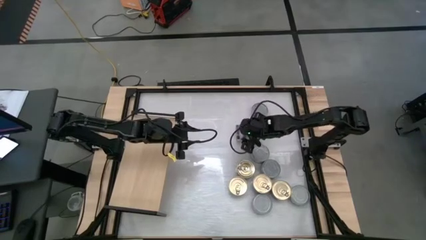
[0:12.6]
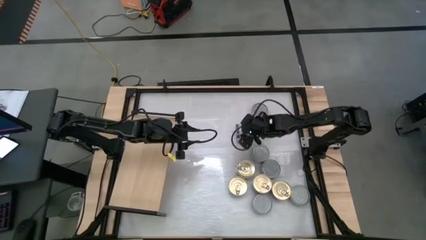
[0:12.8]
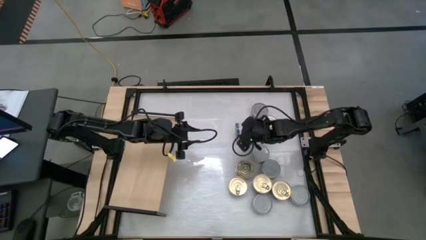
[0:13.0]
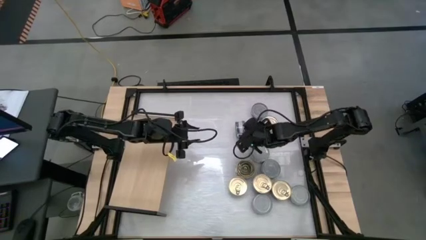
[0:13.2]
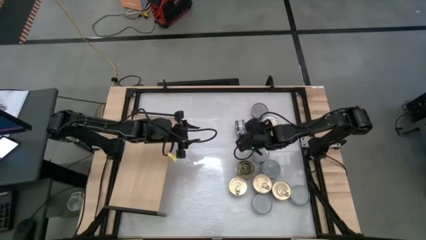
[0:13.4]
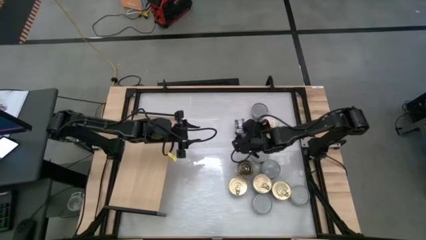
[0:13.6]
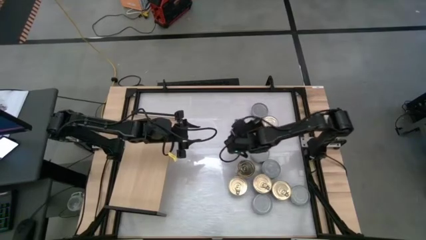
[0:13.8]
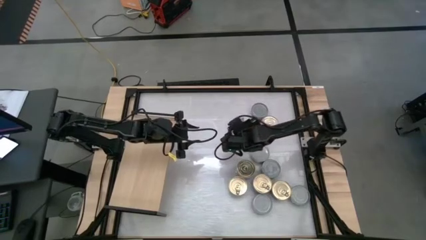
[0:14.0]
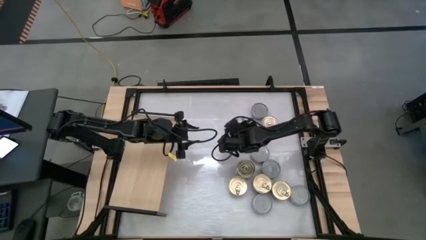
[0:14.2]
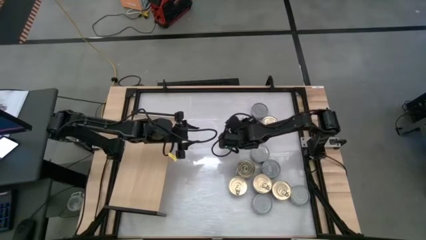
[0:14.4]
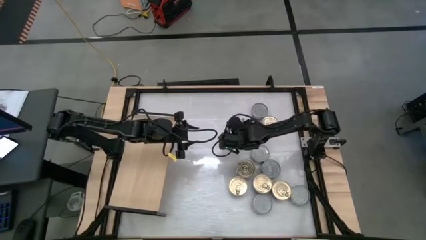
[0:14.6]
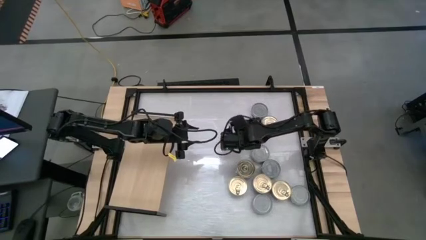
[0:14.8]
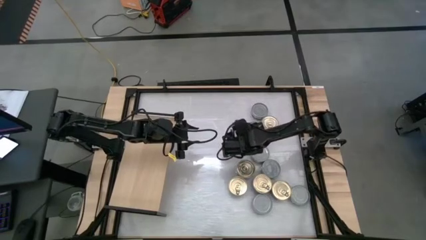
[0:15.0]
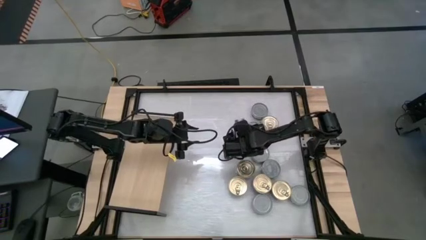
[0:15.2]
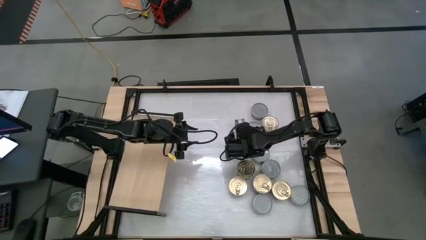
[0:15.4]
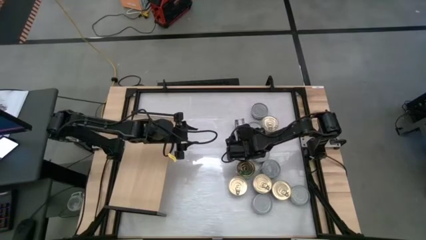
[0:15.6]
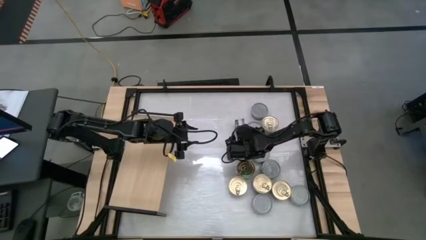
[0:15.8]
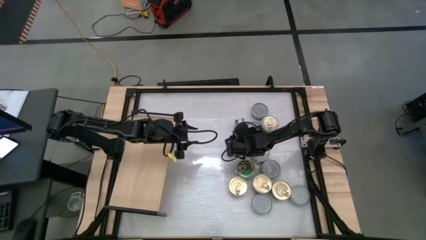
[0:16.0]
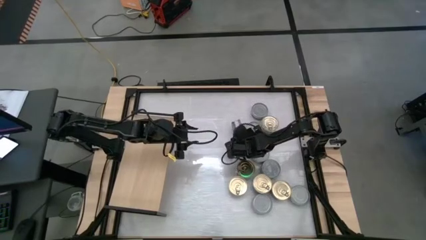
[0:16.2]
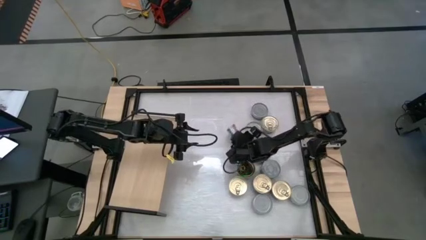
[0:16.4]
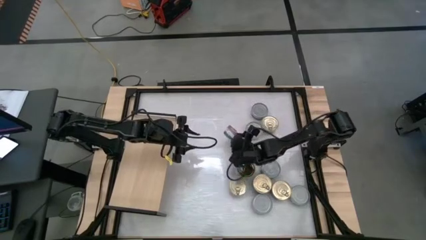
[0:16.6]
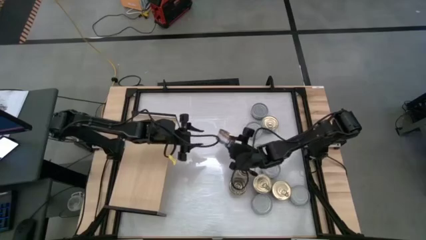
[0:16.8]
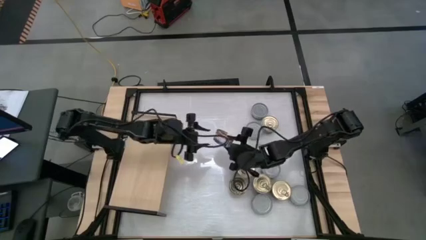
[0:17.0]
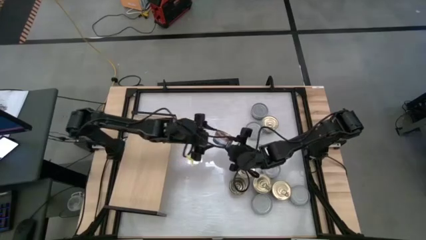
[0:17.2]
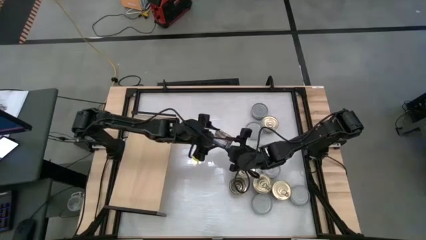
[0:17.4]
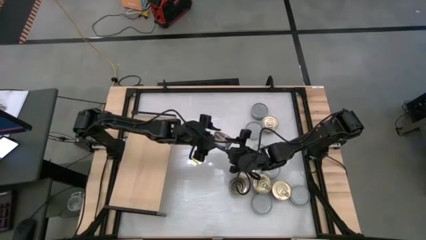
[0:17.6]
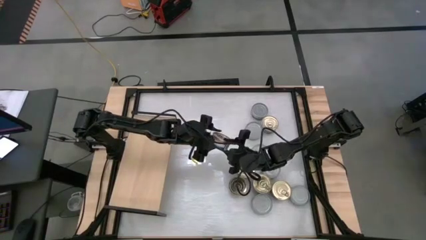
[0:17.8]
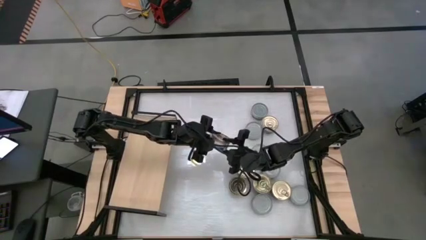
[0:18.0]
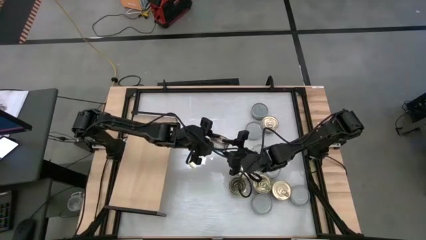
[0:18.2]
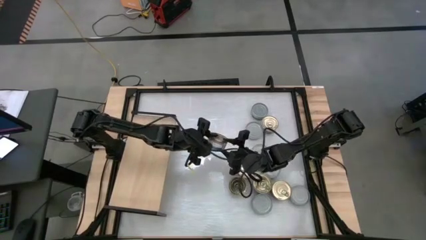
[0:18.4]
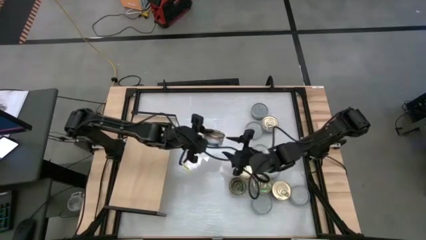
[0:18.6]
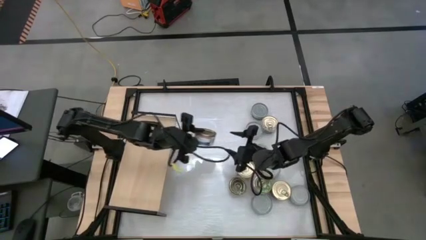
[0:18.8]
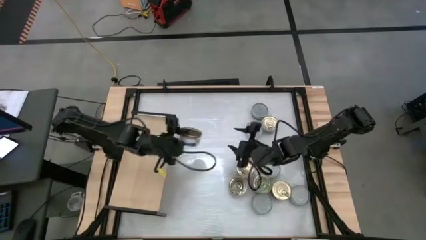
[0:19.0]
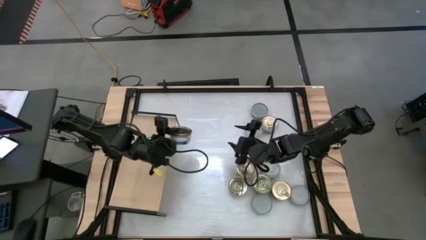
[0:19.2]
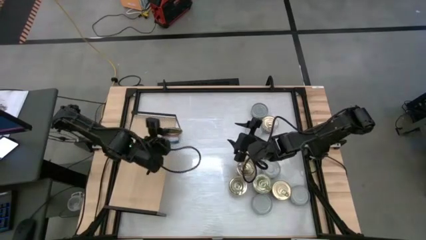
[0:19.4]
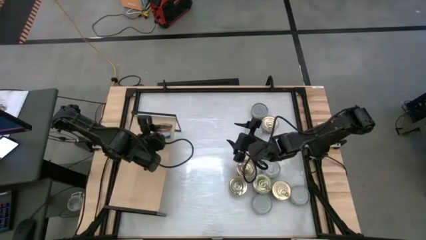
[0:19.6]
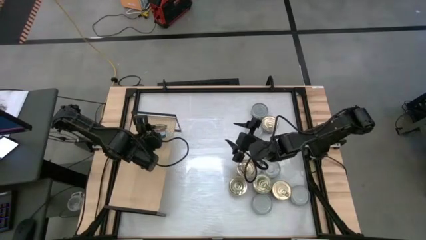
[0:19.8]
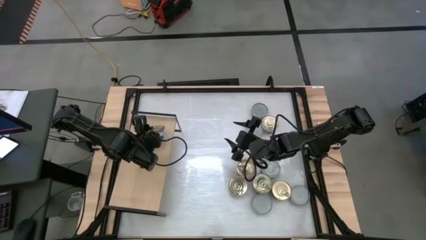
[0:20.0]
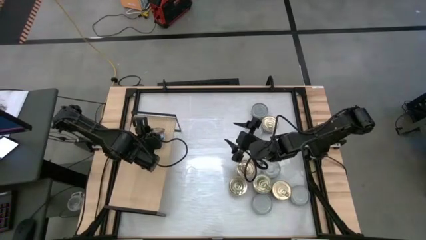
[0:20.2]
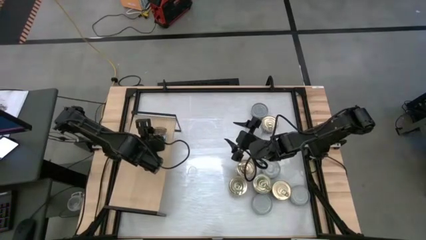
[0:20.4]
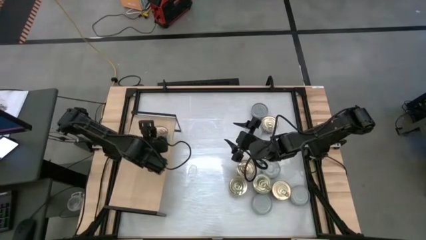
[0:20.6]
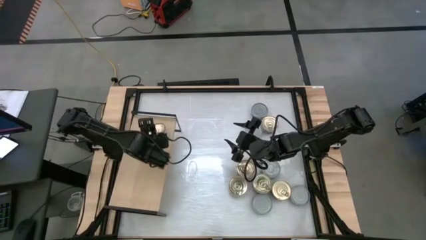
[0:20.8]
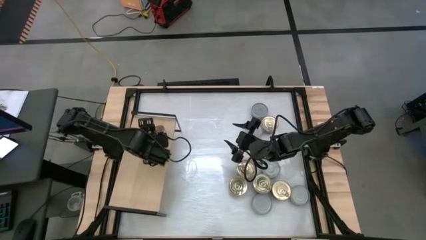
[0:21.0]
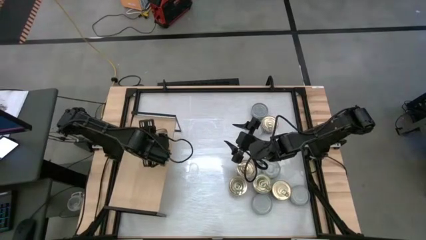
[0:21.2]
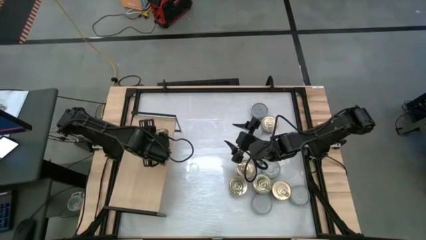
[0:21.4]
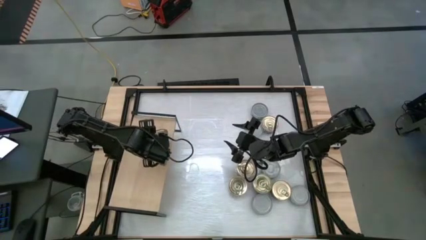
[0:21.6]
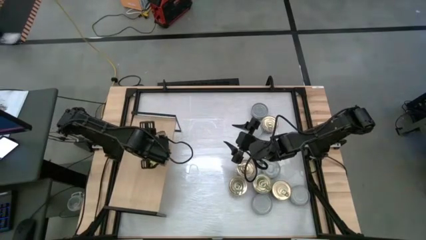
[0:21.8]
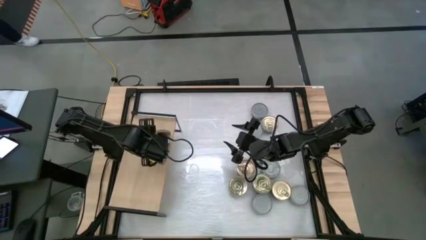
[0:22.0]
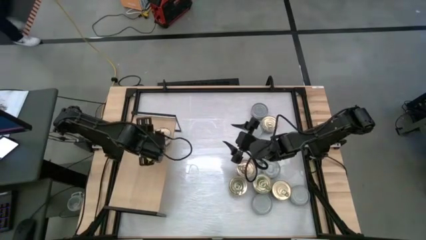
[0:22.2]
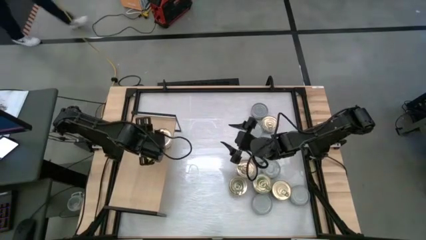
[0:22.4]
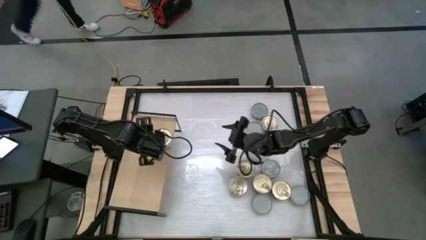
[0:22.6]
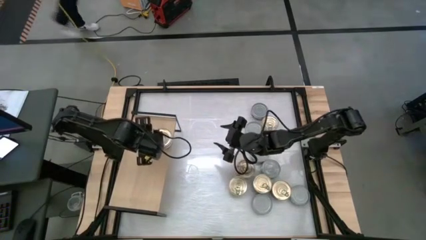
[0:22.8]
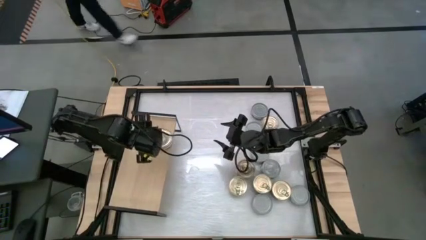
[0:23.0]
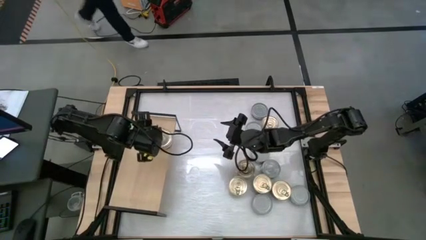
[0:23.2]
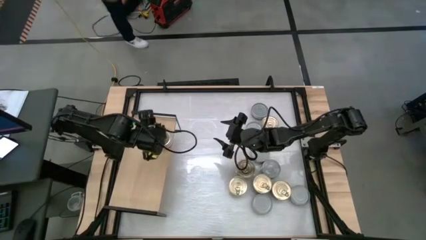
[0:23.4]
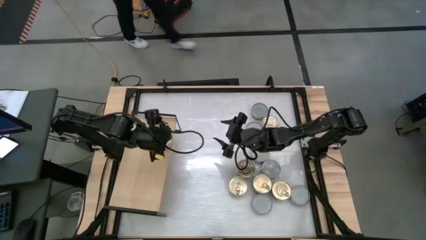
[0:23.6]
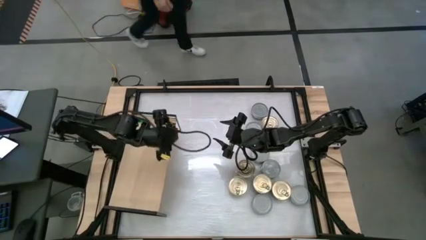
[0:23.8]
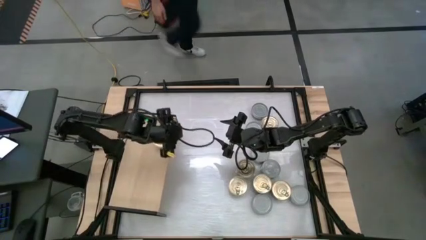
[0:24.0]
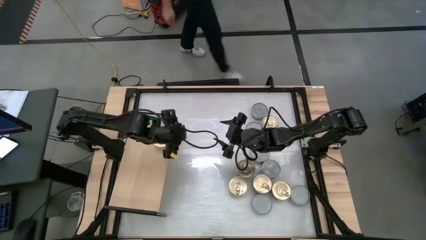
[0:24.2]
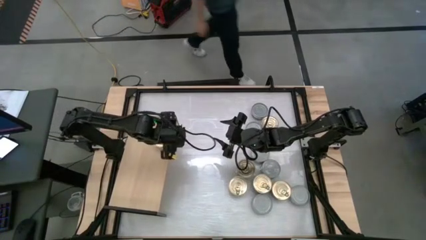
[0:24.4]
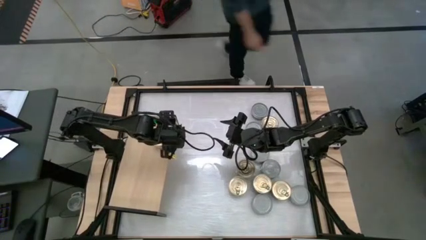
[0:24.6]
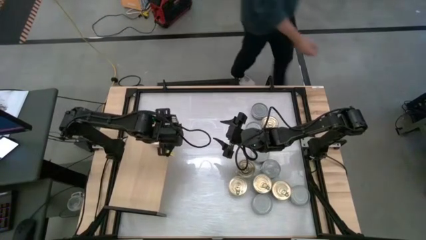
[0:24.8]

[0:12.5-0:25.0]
Task: Stack canned seafood by type on shelf
Put the blue tuna can on the shelf

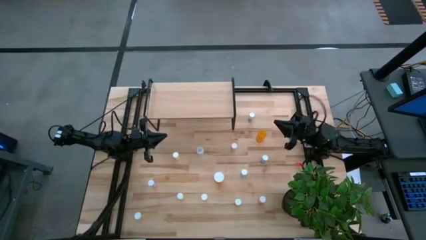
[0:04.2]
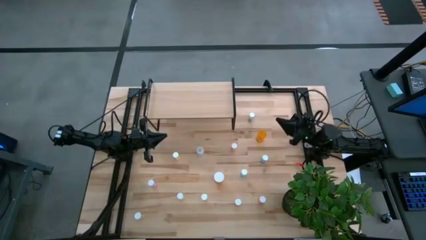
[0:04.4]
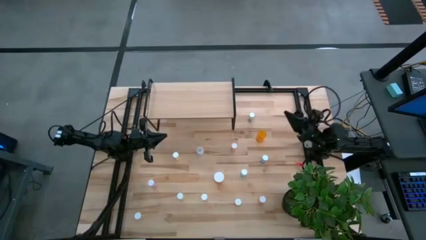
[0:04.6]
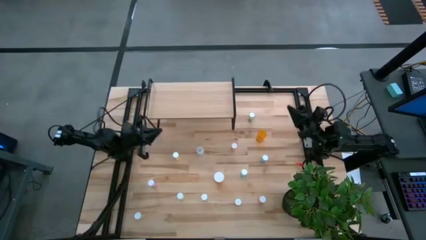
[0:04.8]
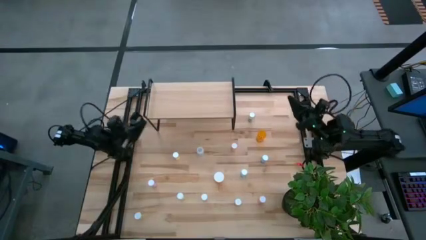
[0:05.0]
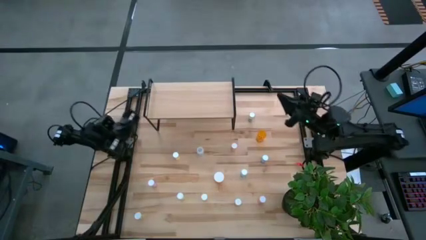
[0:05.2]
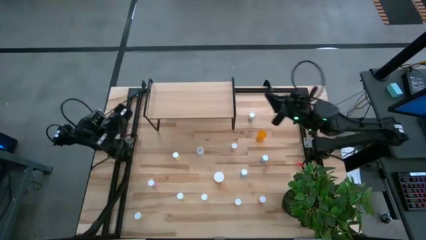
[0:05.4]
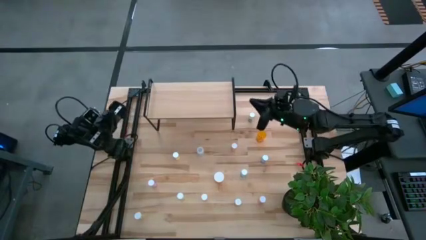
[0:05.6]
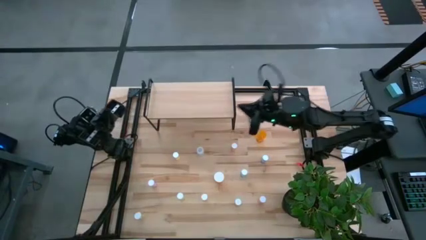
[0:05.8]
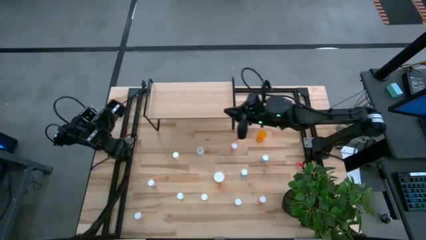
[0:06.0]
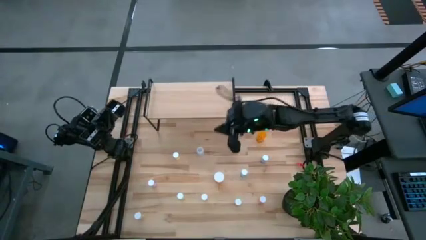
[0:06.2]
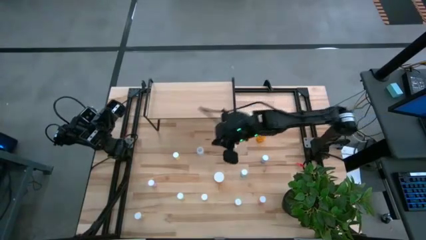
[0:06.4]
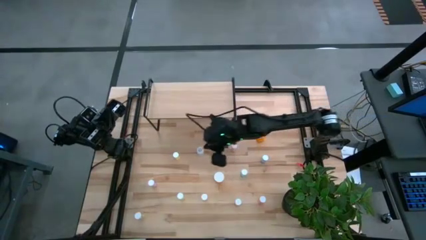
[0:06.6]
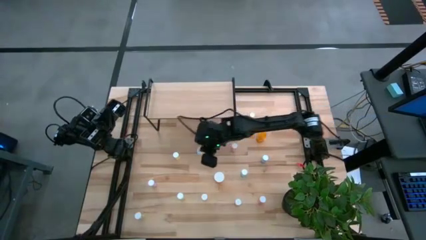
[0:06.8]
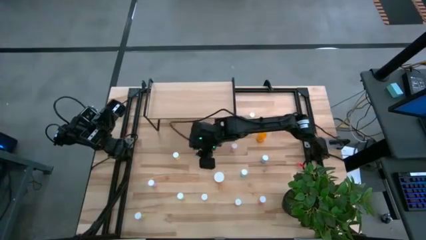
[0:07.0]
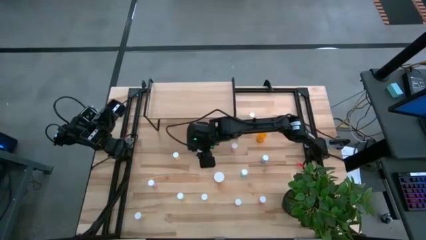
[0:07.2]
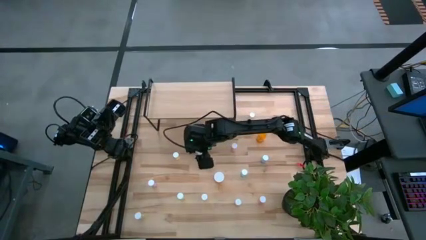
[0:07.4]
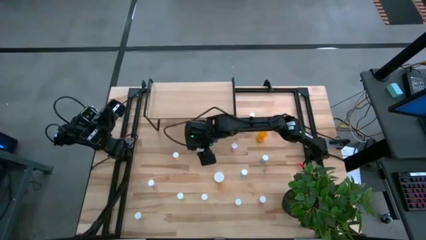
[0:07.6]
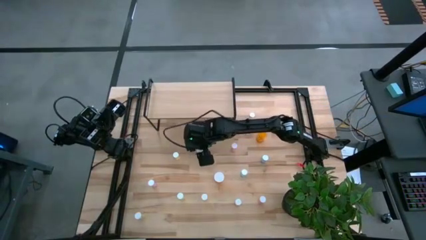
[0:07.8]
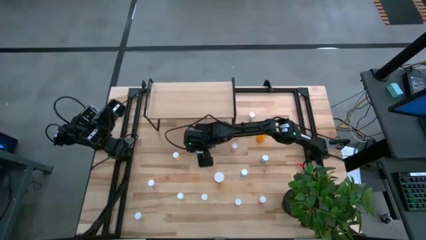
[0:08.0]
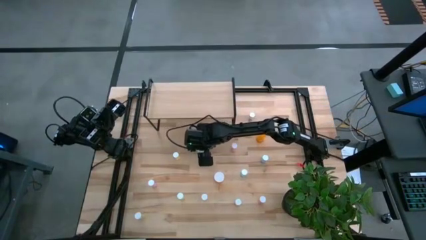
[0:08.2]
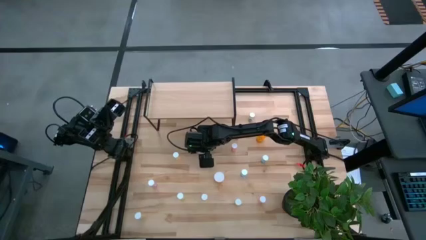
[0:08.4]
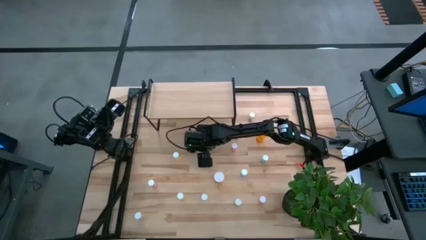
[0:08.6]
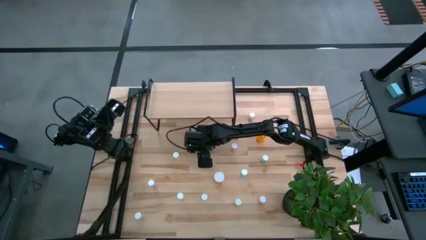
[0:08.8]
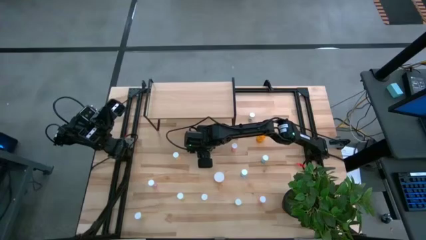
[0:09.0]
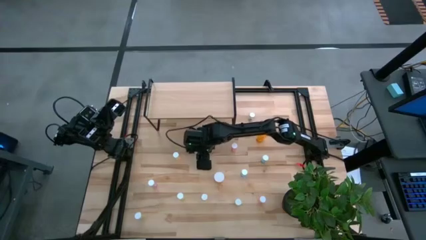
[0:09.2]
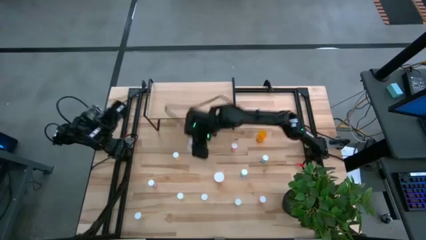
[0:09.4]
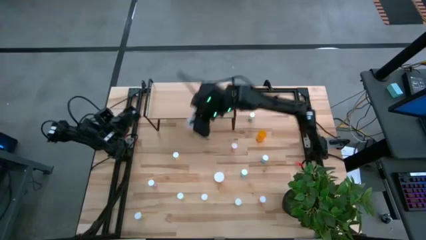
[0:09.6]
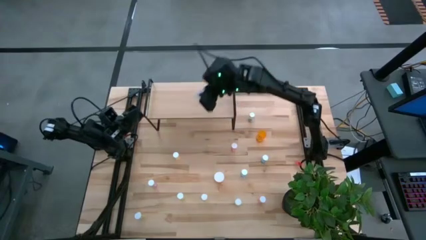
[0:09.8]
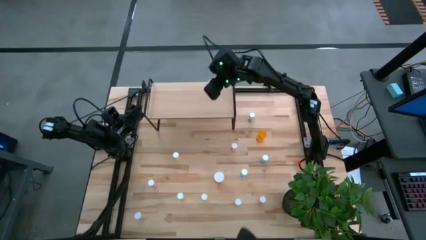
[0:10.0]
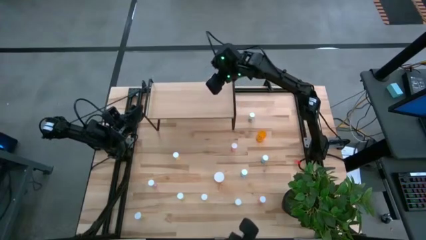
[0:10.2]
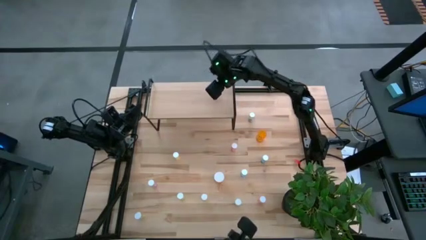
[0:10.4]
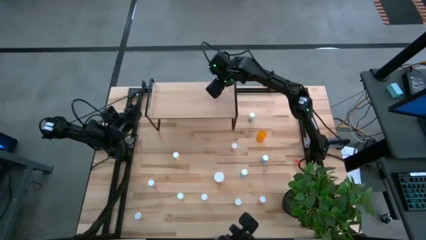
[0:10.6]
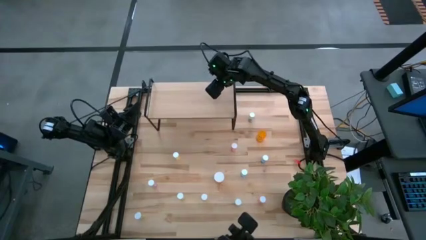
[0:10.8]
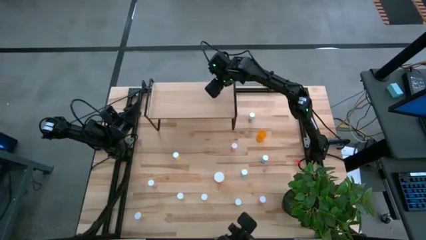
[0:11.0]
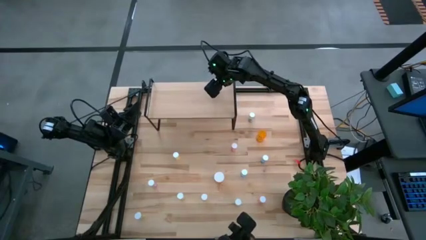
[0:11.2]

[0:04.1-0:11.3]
Task: Pick and place medicine bottles onto shelf by color
Put the white pill bottle on the shelf
